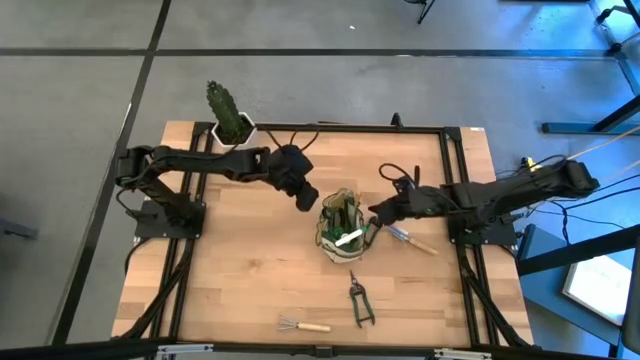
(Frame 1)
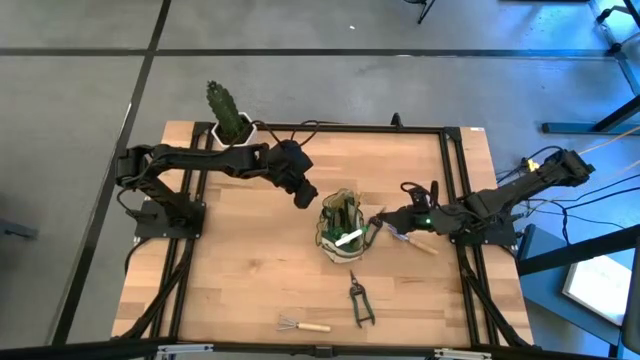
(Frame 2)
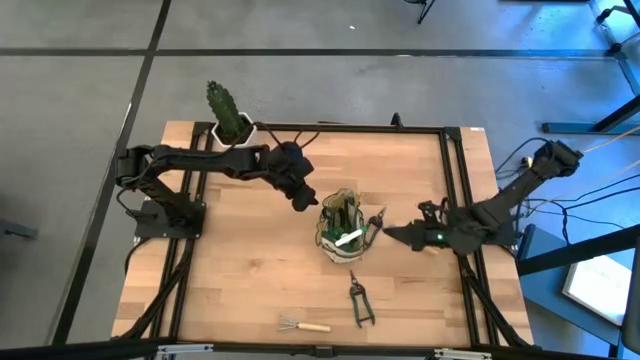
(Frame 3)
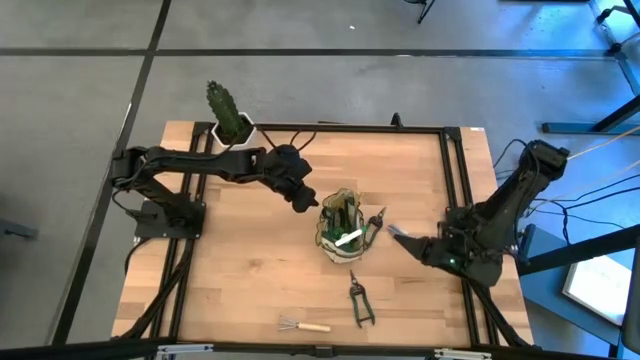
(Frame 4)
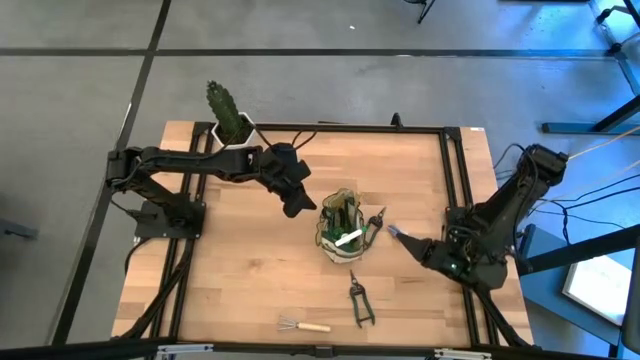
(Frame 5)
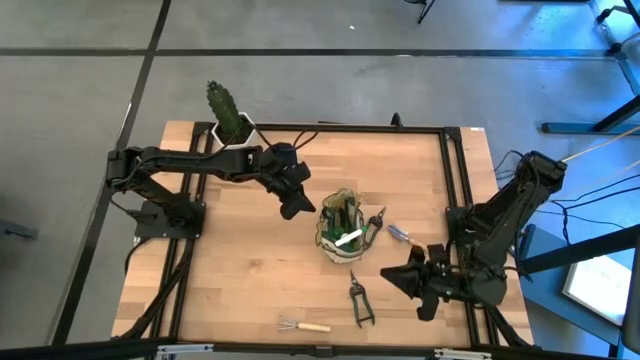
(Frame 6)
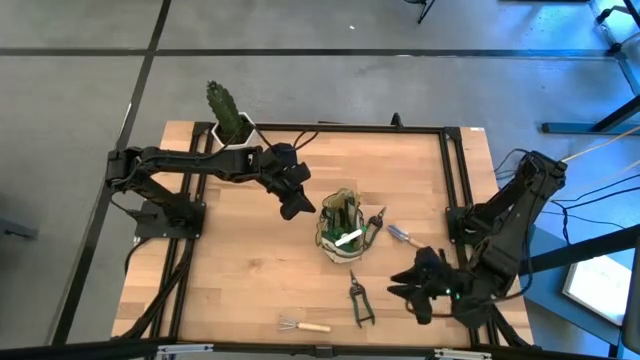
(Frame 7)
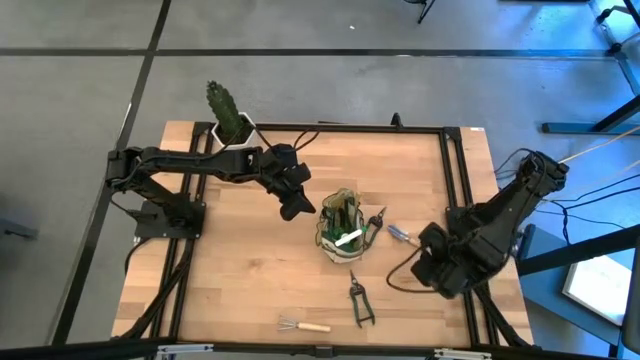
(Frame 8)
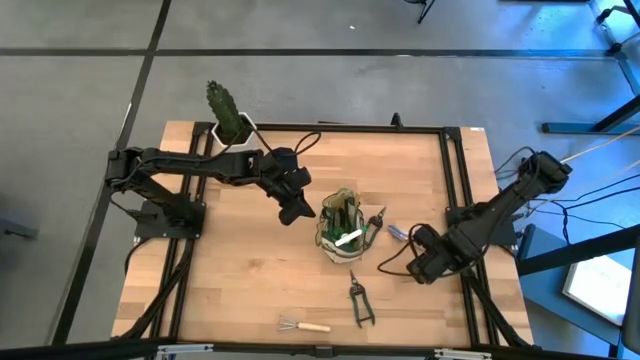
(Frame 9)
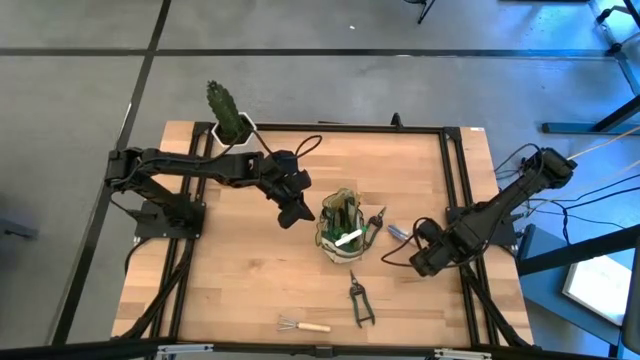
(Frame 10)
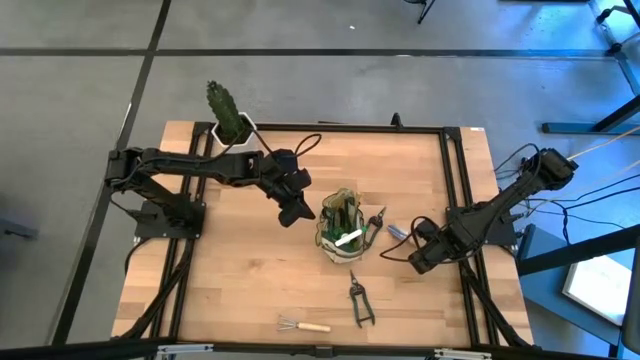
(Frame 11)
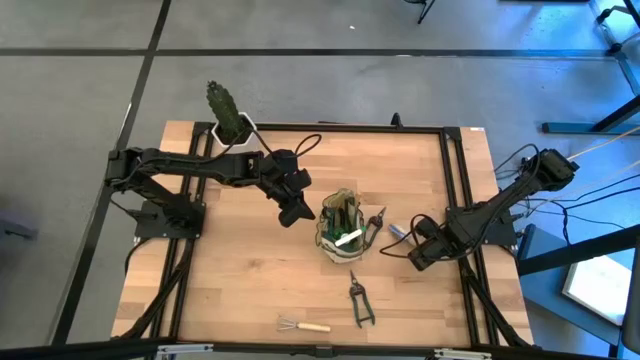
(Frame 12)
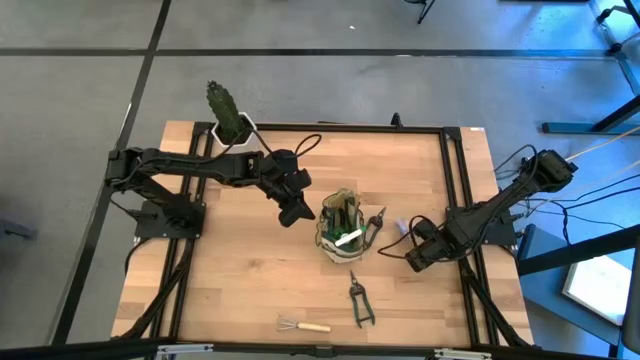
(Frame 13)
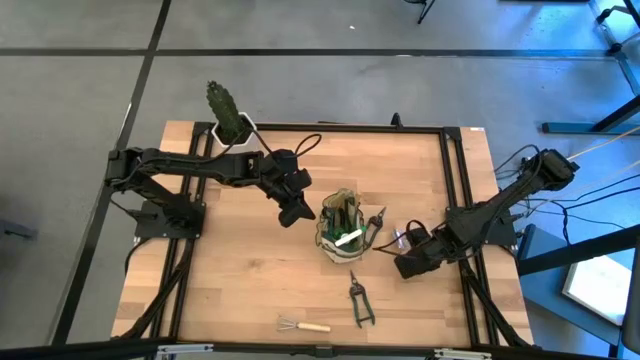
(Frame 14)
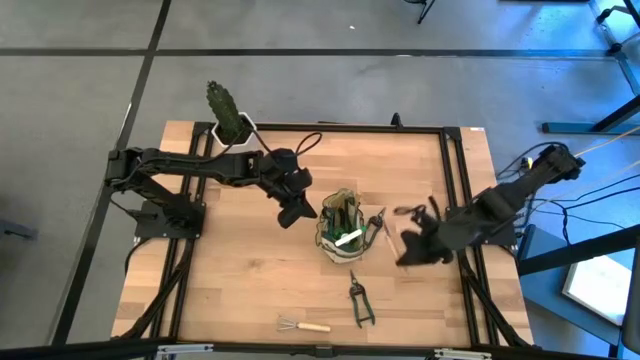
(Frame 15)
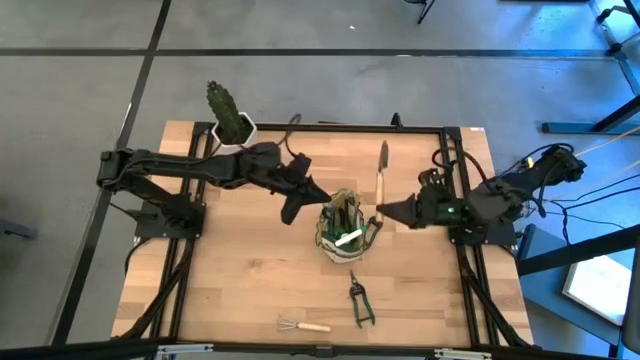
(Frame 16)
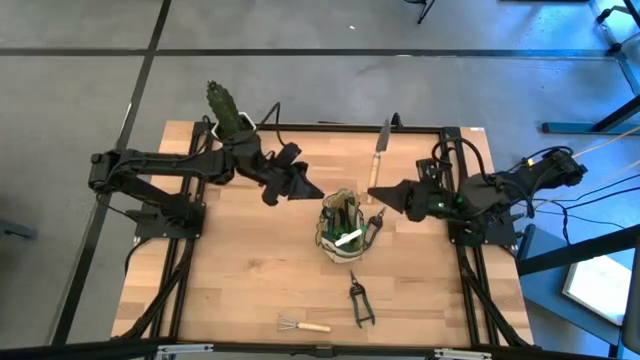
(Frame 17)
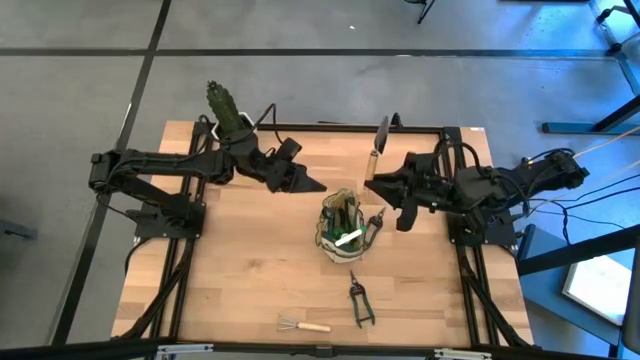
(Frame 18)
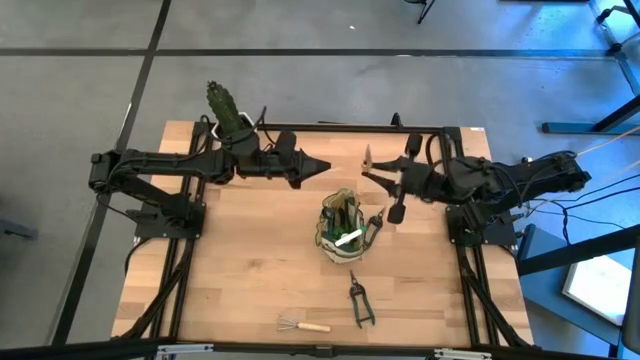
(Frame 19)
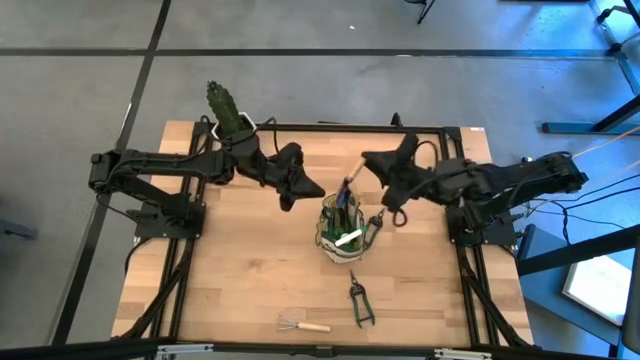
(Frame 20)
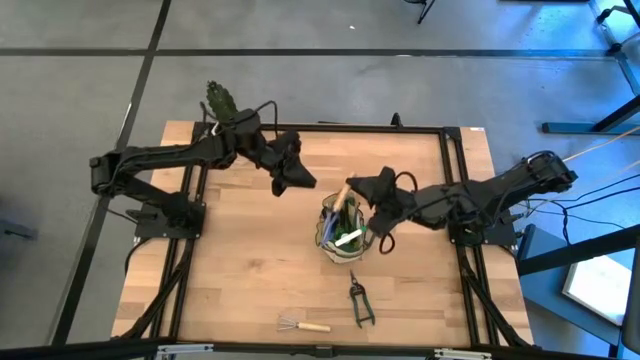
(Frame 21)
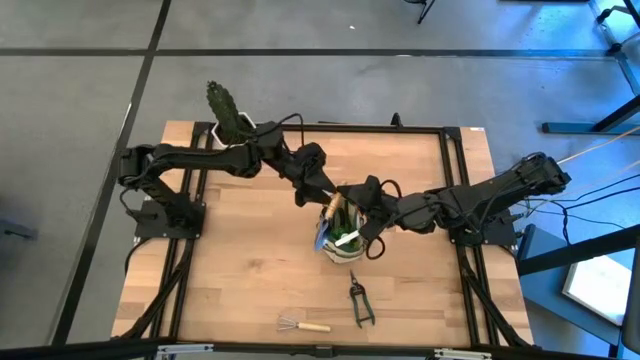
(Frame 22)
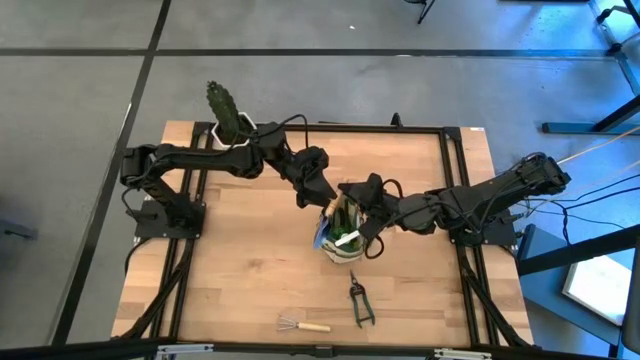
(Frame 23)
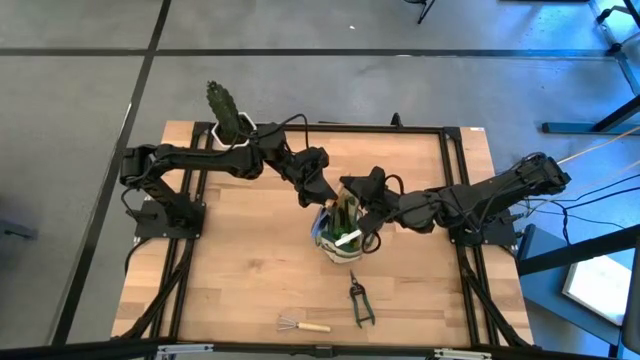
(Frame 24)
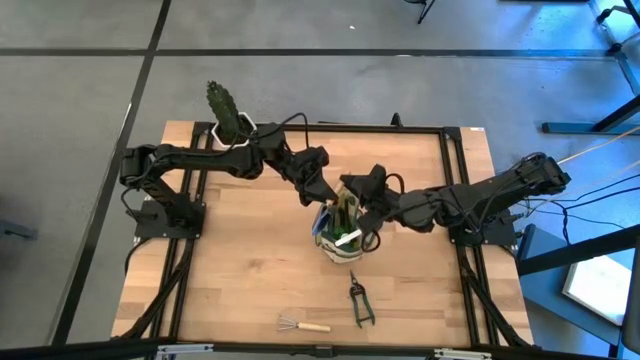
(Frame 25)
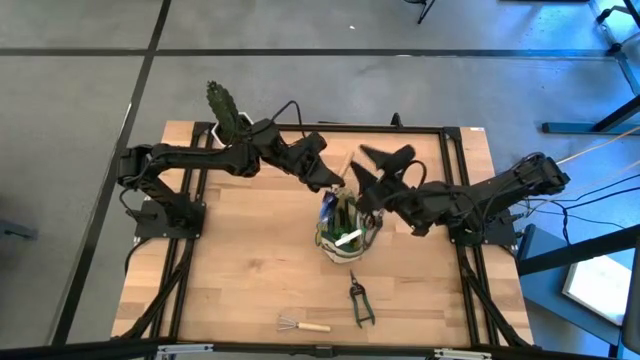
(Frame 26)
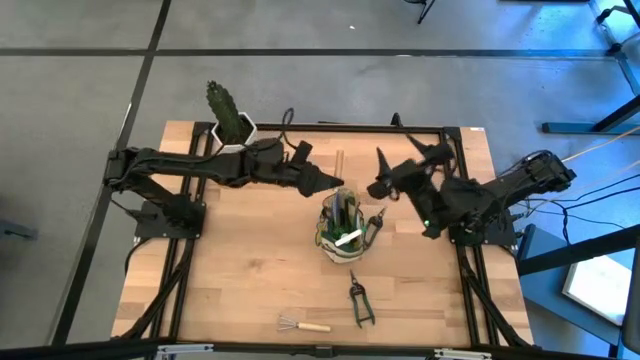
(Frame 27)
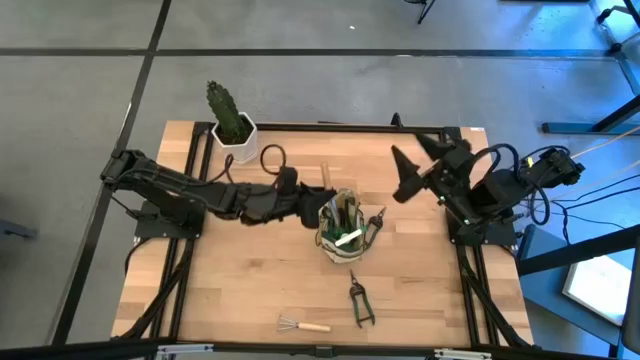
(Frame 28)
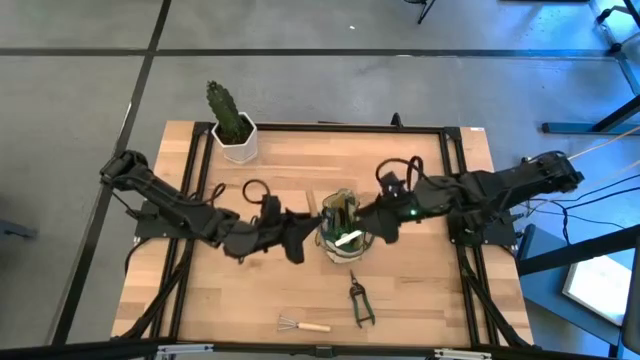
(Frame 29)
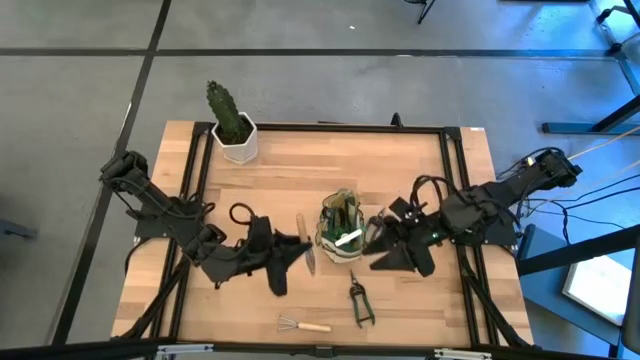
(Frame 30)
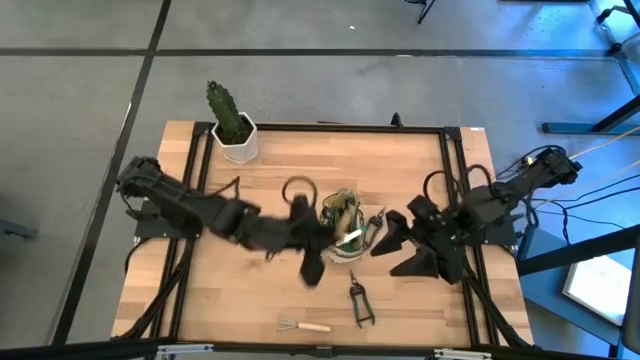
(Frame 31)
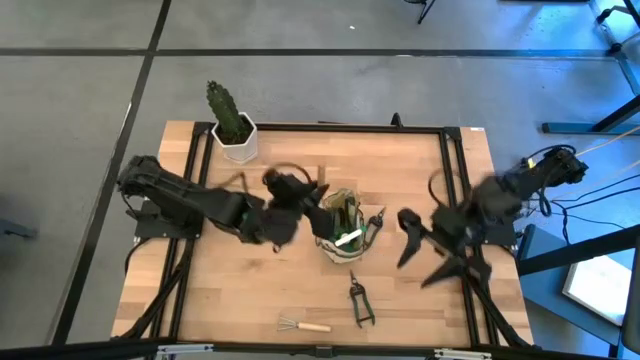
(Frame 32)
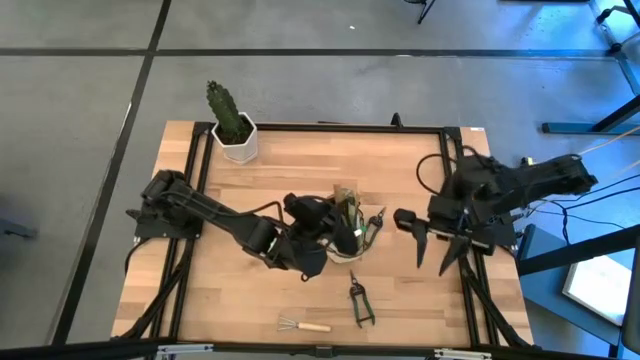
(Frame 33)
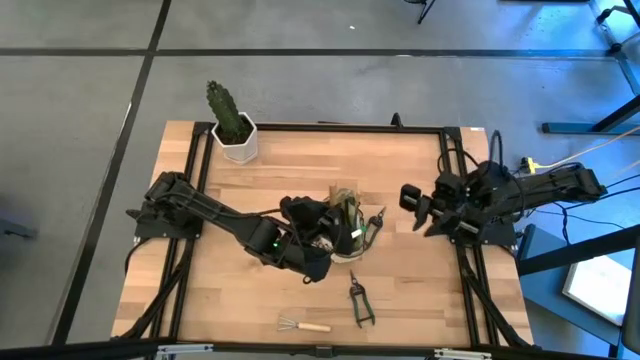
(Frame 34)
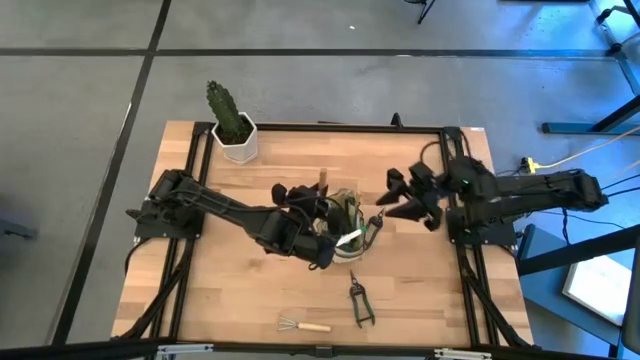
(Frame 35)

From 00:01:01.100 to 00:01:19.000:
Task: Pick & Place Garden tools in Gardening bag
Put the trowel into the gardening bag

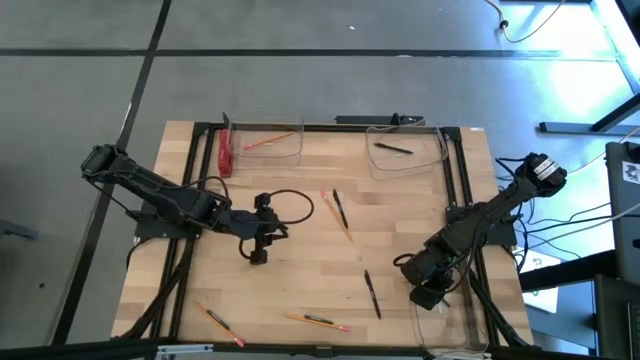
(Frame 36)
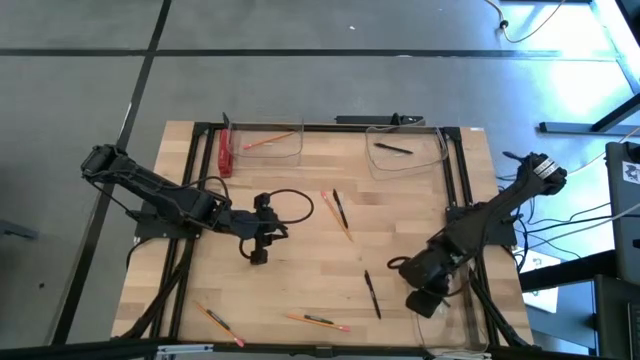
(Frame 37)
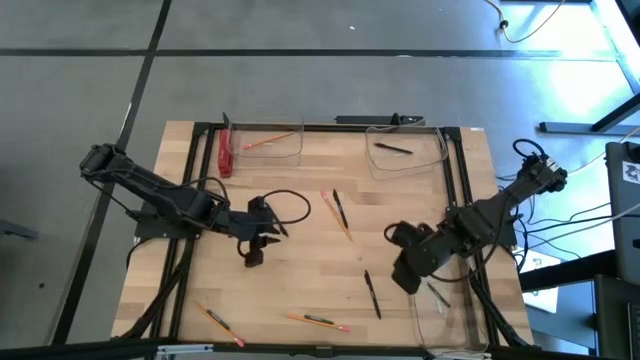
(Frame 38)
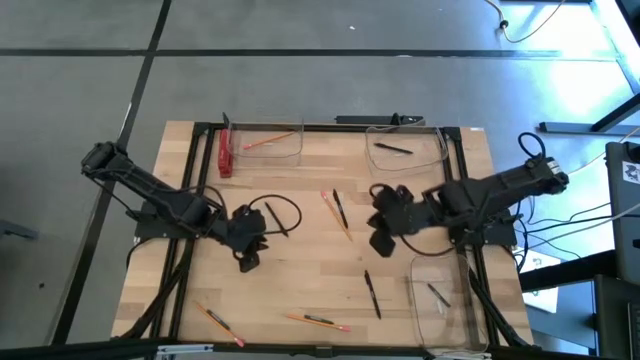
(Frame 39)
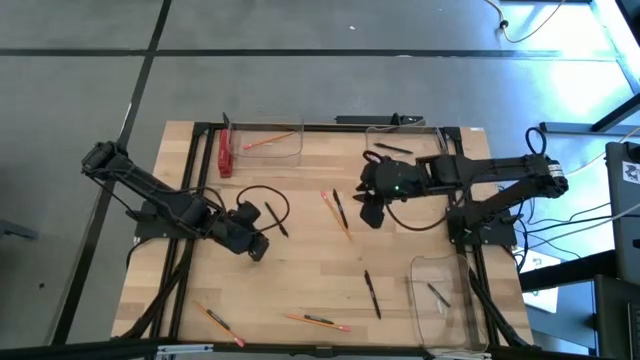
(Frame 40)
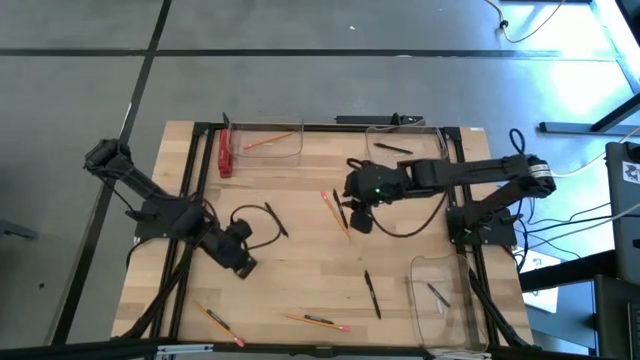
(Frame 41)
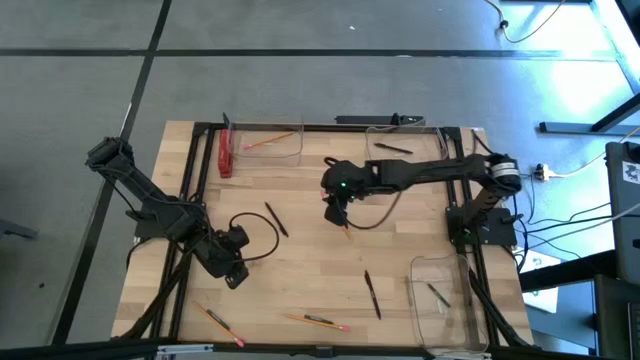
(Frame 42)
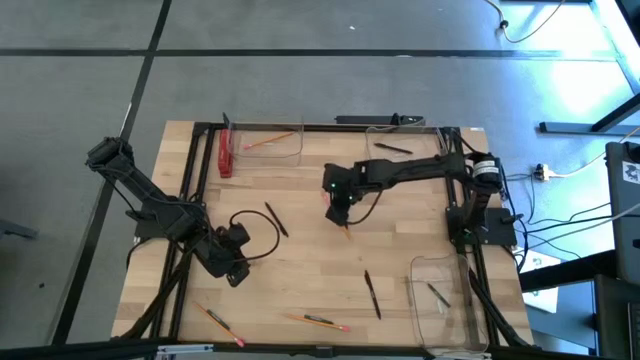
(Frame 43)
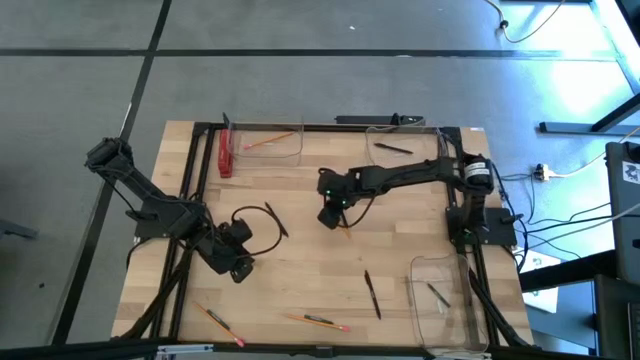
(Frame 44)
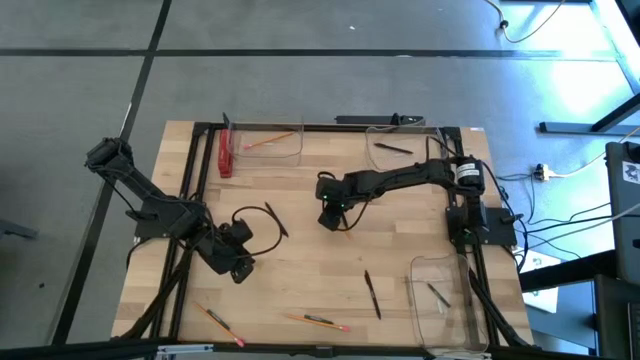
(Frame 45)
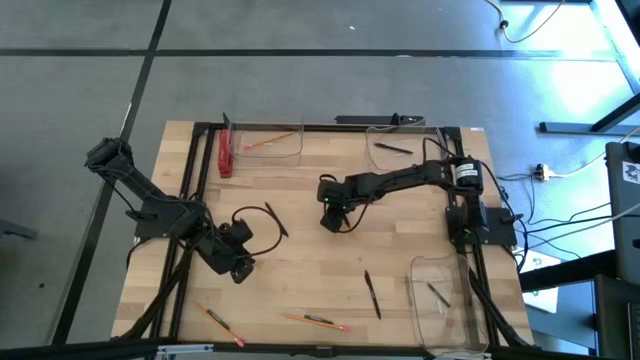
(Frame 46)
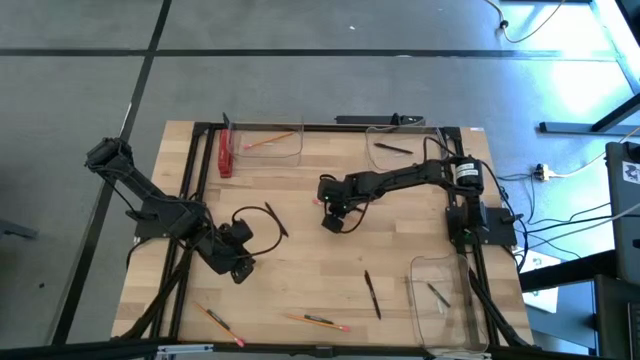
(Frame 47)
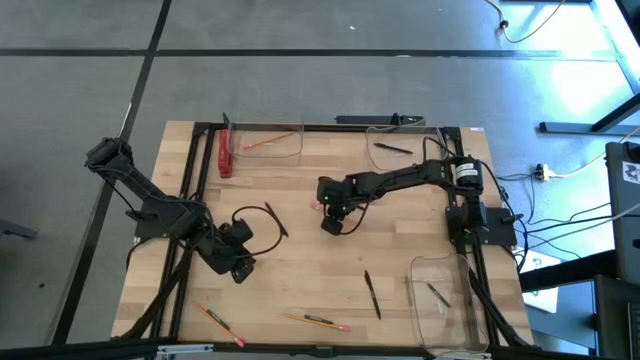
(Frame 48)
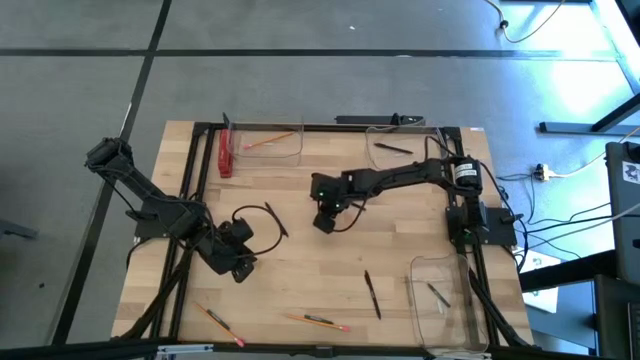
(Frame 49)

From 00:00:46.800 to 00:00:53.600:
Task: Sort crayons/erasers/pens/pencils in bins
Put the top yellow pencil into the top left transparent bin
